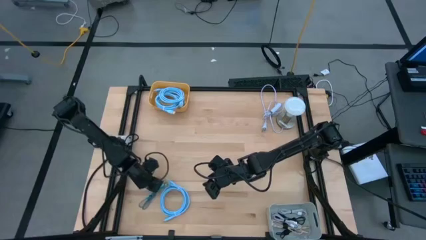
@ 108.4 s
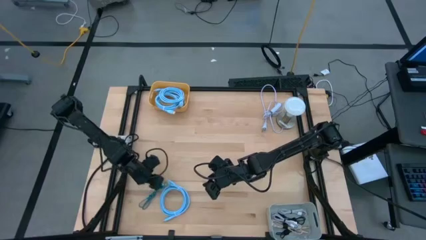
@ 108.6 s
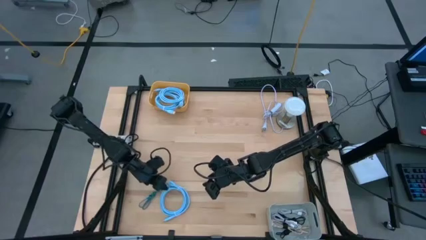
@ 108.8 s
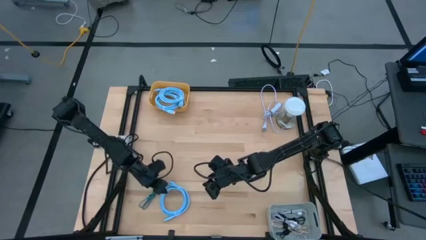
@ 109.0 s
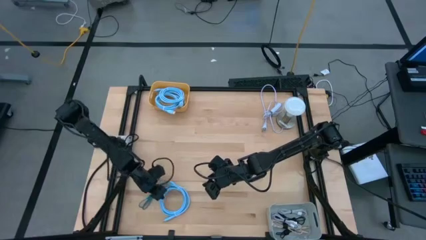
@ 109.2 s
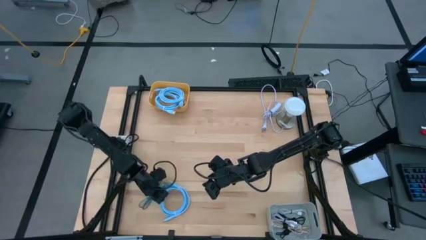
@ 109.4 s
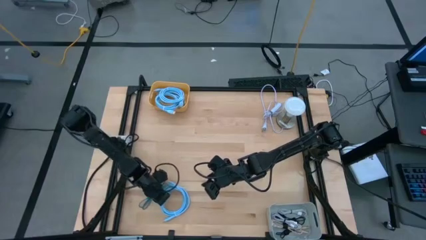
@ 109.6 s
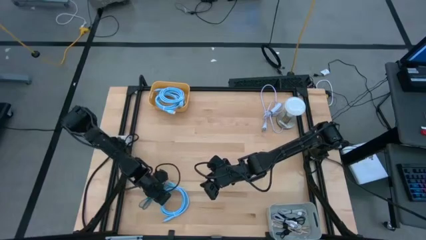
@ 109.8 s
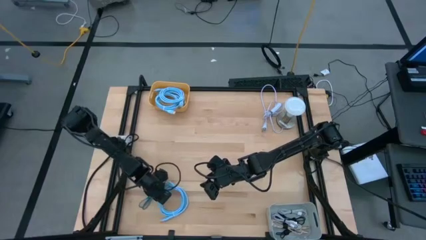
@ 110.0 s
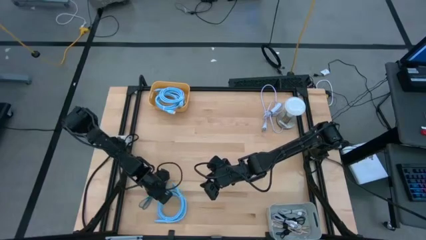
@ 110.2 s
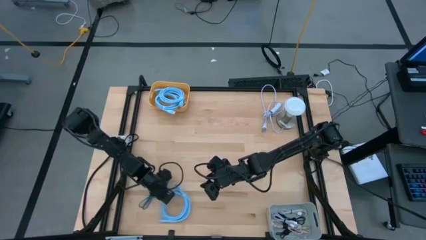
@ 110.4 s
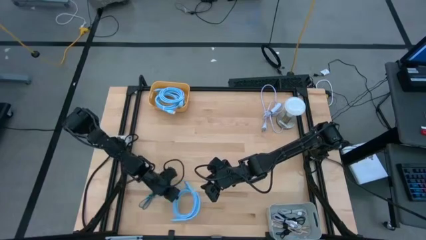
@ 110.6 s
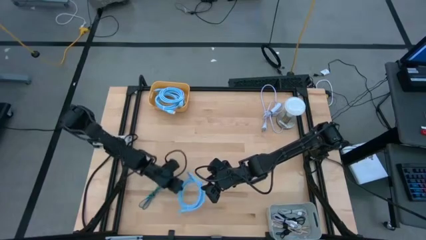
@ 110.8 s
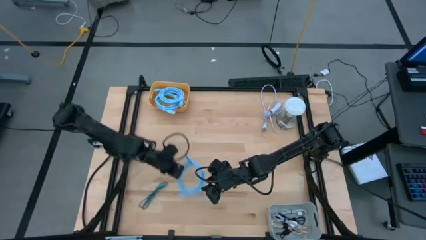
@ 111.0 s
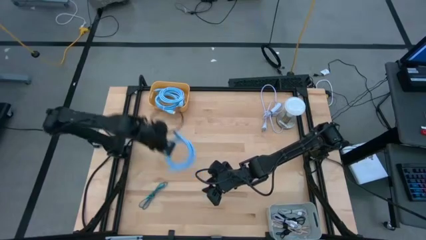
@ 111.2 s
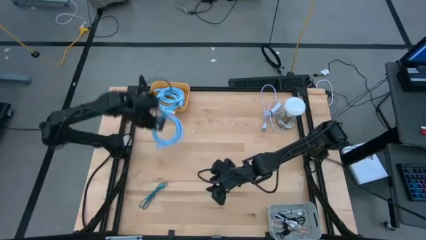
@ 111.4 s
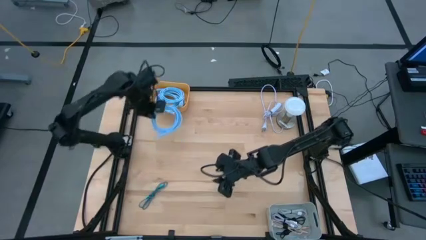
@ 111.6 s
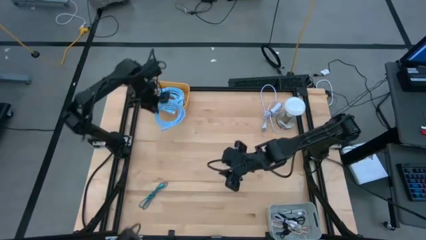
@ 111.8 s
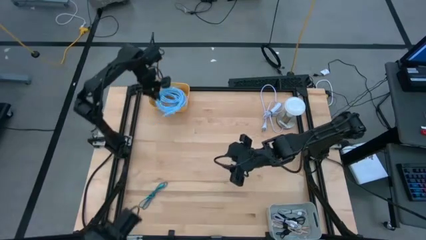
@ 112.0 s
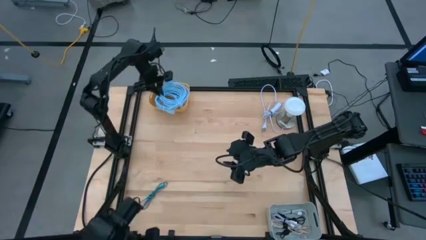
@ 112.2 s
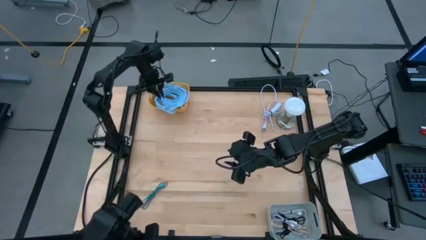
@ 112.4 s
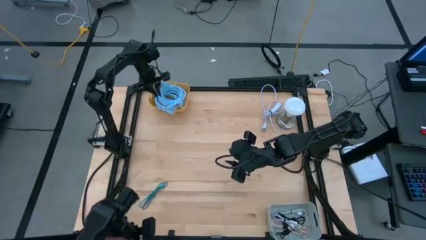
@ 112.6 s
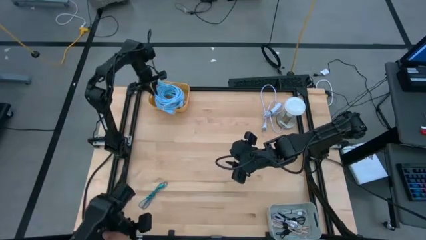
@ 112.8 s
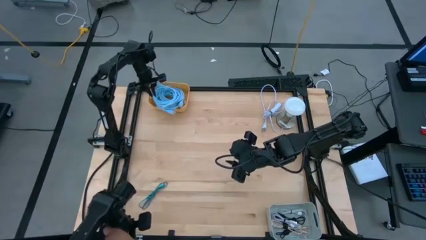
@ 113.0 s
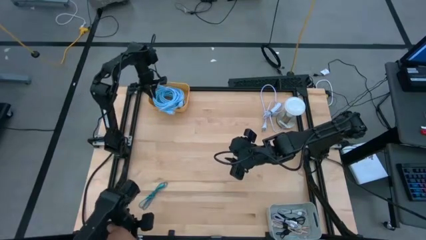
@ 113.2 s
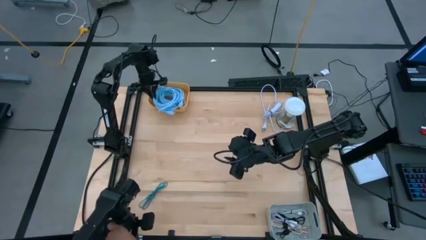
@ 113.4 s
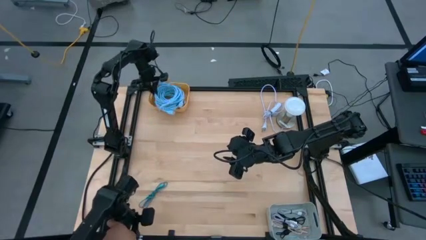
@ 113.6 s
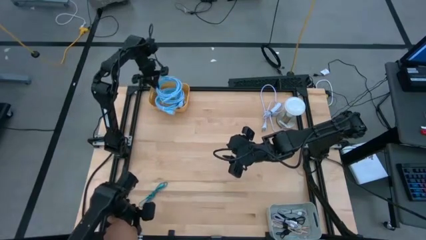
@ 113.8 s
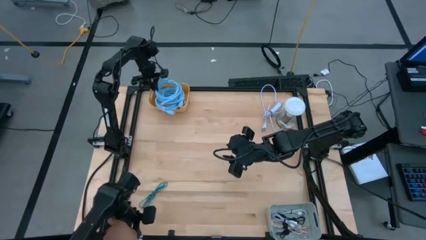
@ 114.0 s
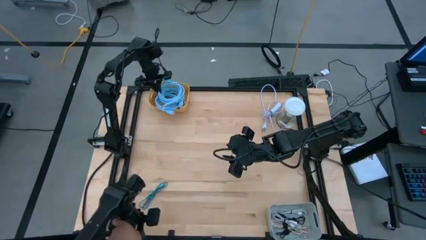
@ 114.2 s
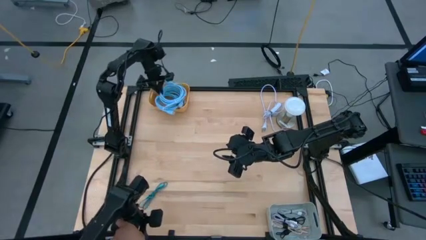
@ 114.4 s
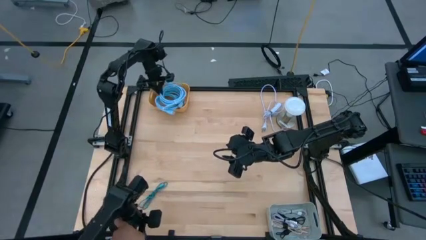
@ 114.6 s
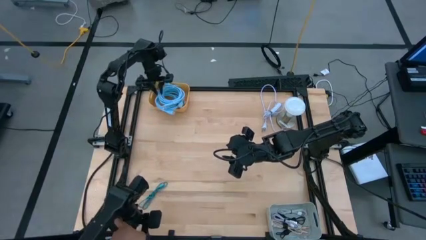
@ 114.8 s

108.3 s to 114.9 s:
Task: Pick & Place USB Port
Put the blue hdmi cable into the yellow bin

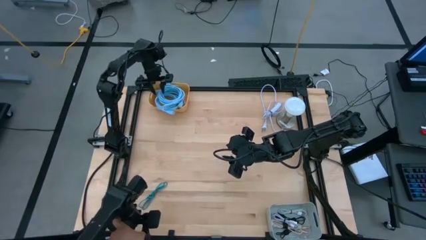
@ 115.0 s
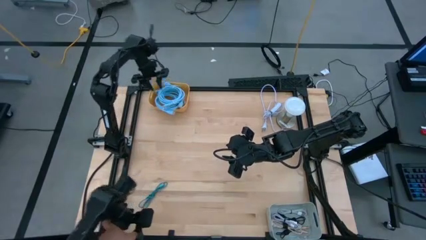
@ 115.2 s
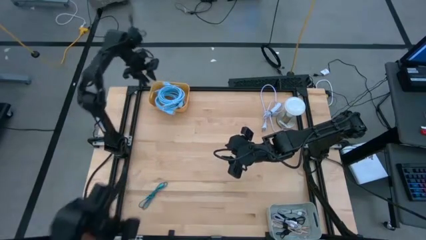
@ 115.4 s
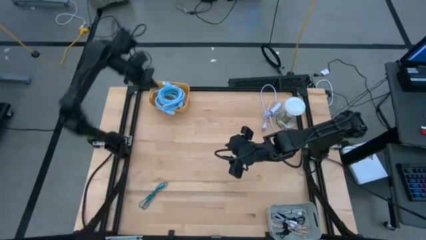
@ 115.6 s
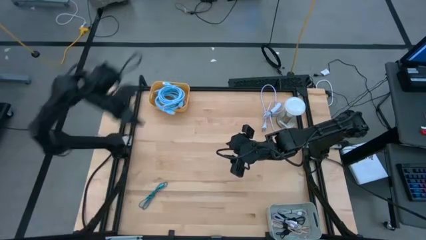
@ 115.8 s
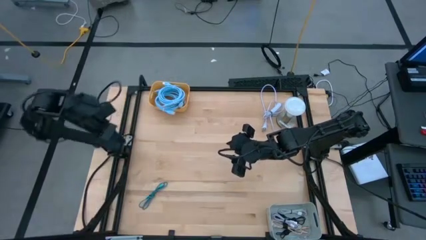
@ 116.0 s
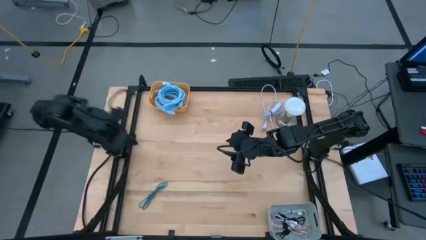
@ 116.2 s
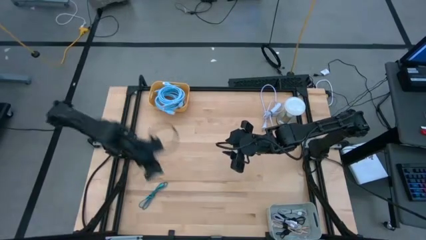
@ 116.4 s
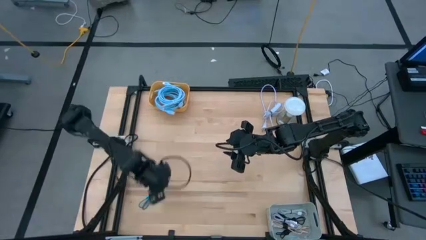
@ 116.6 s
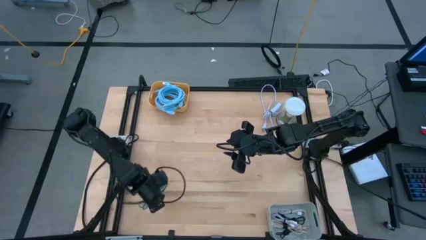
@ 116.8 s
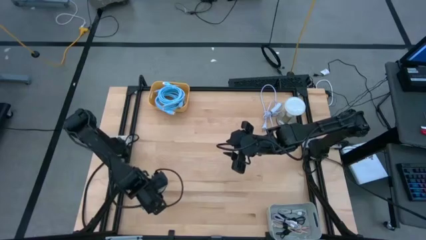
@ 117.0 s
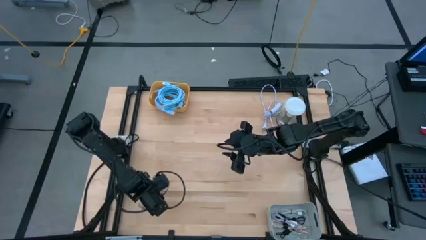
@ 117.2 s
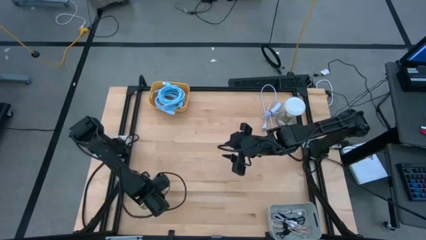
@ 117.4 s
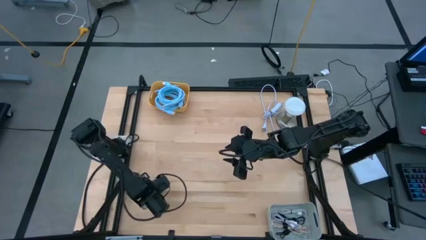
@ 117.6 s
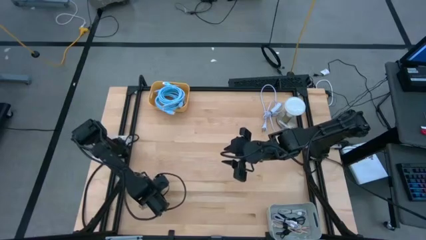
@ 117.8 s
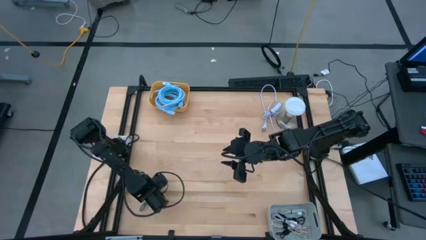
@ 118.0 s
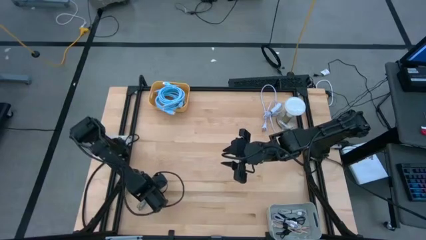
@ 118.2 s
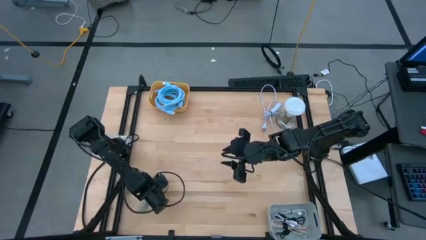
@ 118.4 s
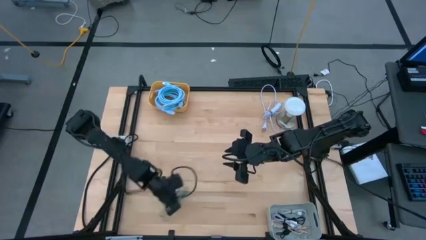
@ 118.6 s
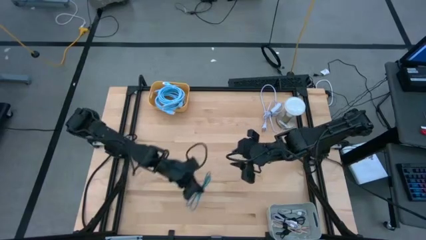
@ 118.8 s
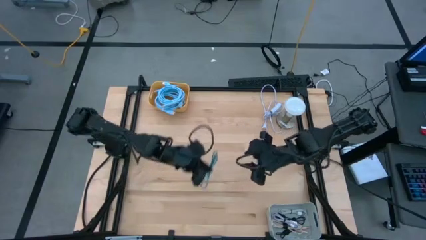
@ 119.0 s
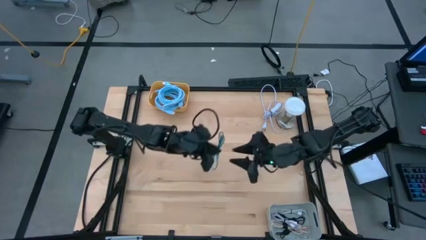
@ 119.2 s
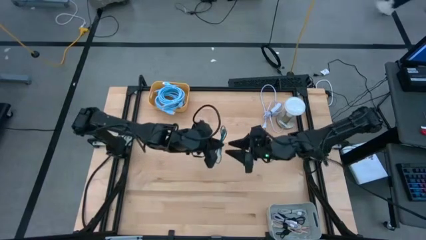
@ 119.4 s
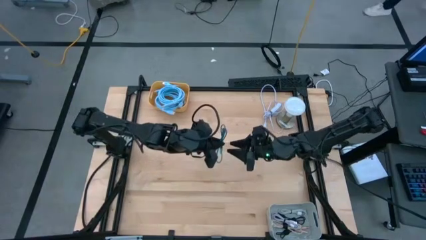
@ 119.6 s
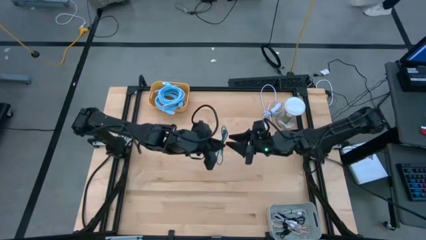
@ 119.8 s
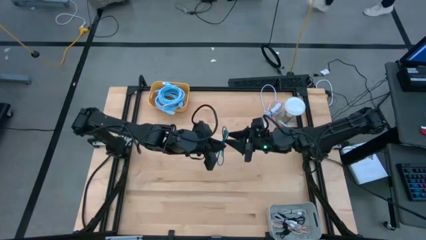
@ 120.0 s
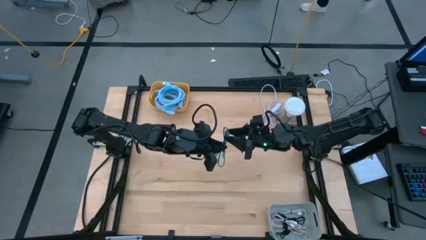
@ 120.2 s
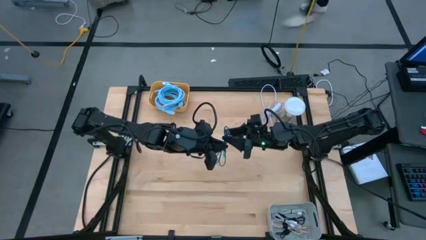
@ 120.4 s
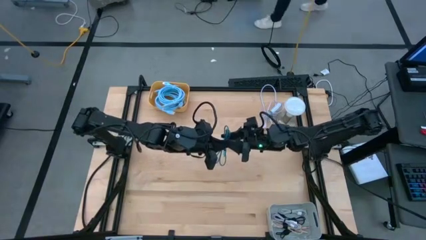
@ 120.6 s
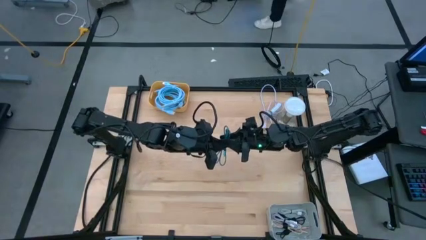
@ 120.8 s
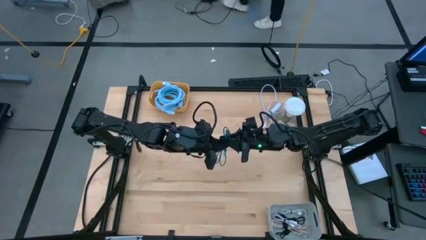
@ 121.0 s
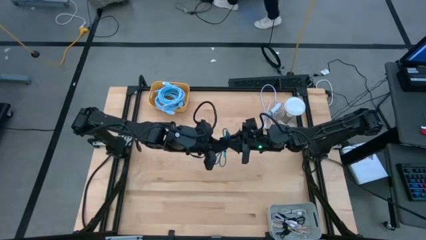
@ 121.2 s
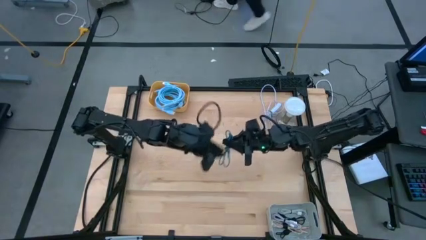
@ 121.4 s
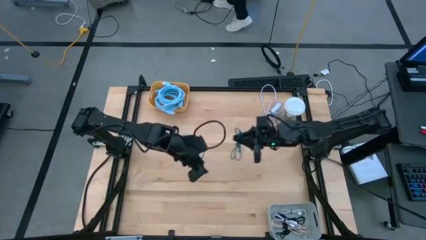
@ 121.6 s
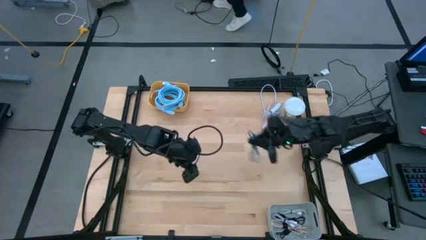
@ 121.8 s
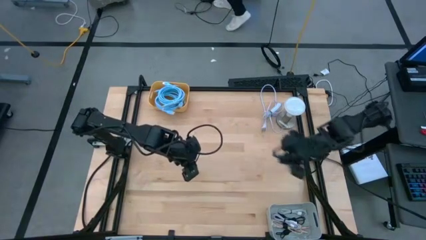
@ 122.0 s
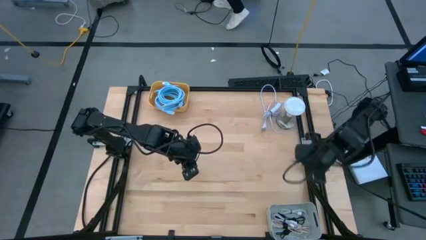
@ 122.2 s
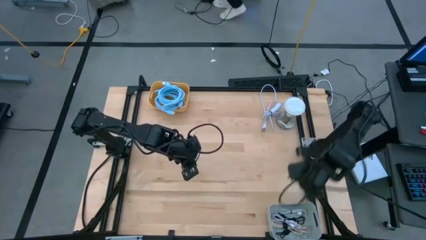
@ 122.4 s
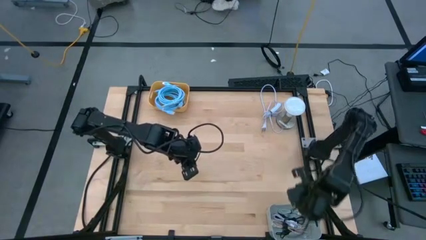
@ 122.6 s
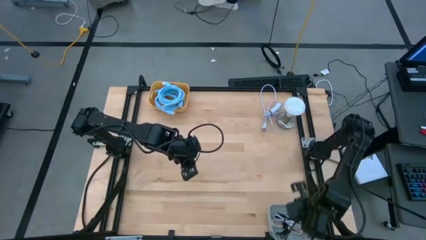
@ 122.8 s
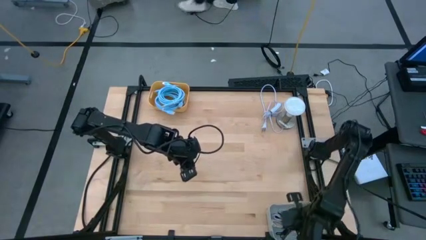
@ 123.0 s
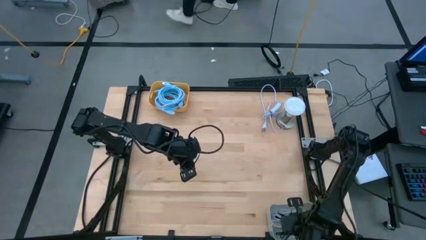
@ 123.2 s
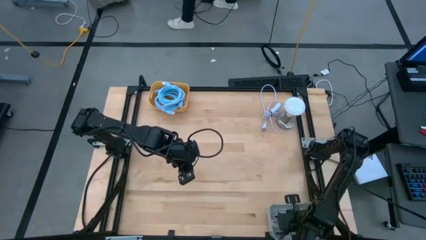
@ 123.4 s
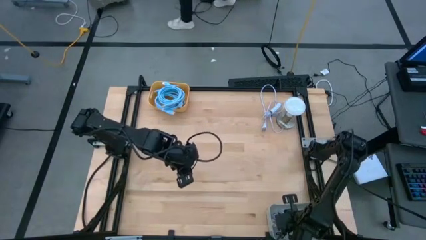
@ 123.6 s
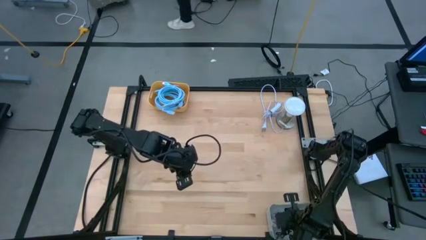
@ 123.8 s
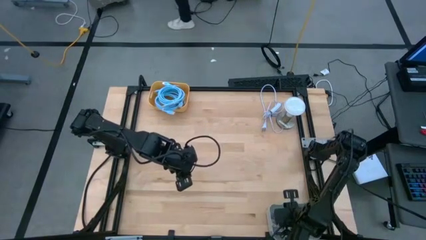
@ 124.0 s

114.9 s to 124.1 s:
Put the blue charger cable into the gray bin
